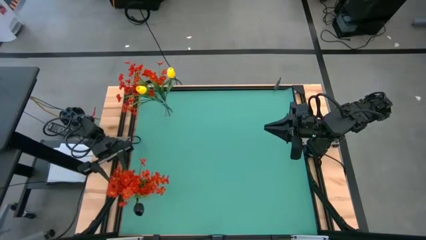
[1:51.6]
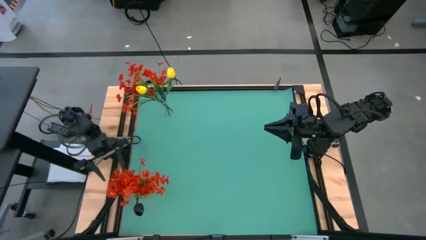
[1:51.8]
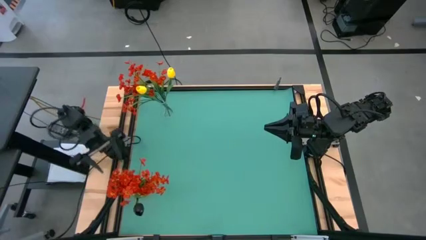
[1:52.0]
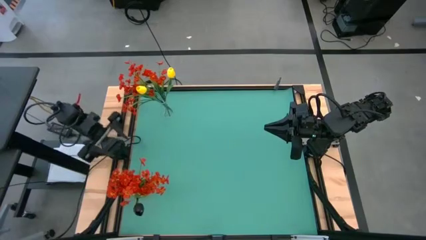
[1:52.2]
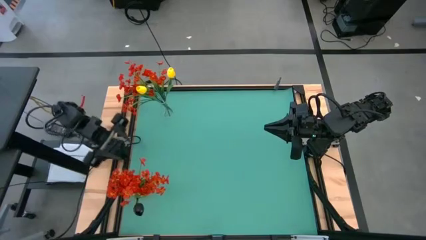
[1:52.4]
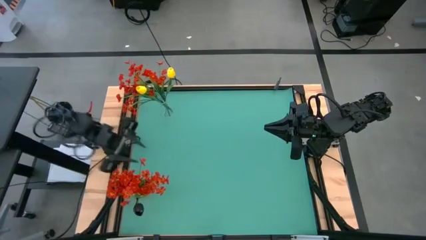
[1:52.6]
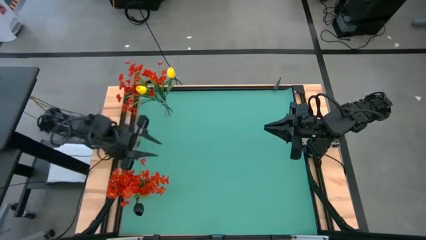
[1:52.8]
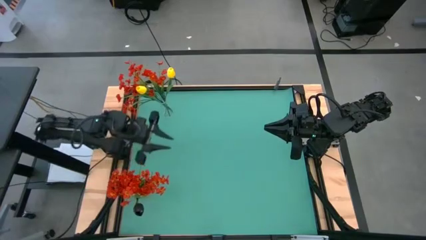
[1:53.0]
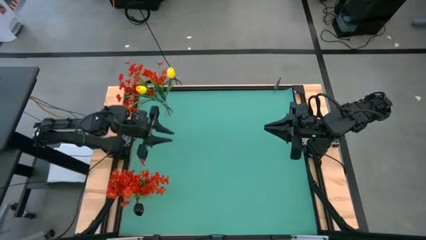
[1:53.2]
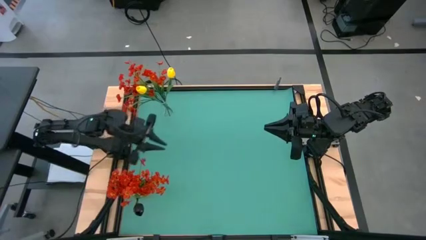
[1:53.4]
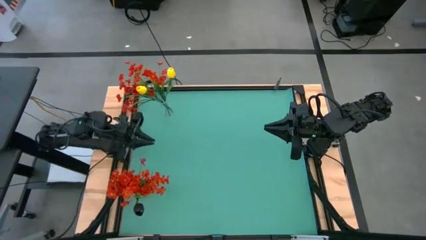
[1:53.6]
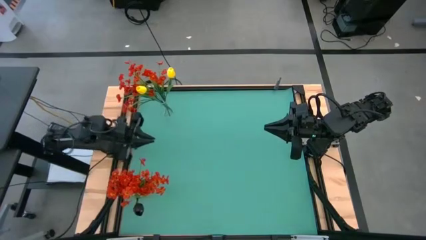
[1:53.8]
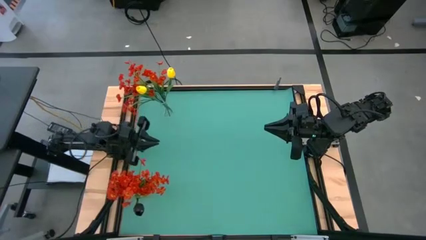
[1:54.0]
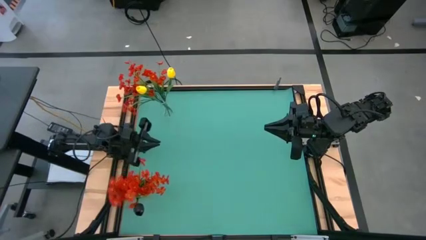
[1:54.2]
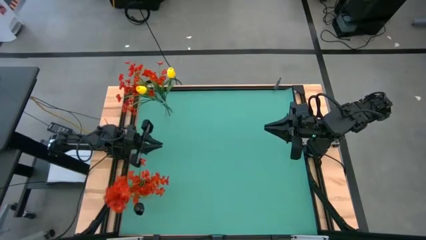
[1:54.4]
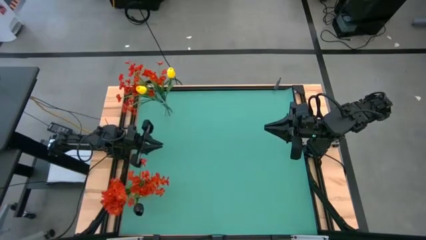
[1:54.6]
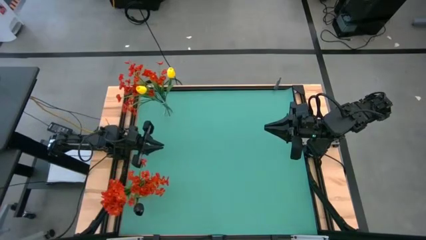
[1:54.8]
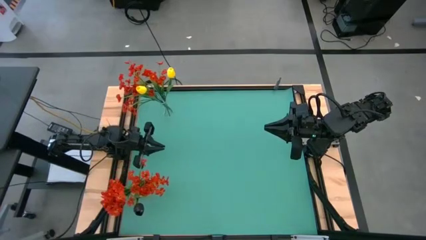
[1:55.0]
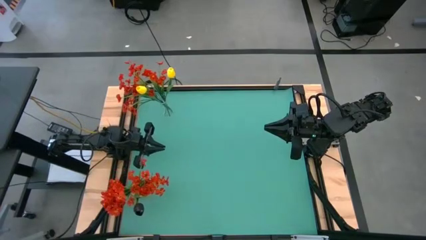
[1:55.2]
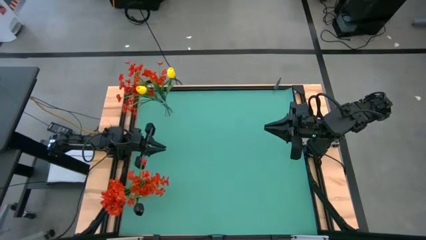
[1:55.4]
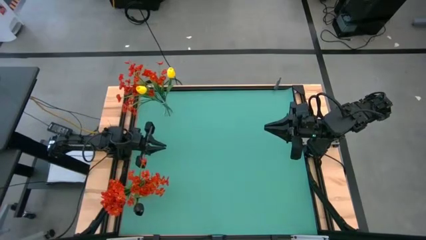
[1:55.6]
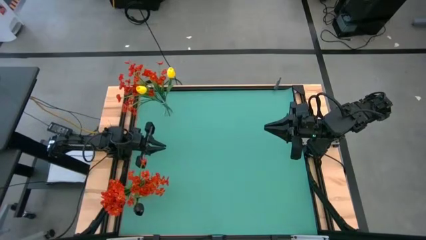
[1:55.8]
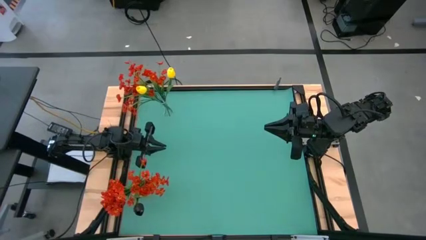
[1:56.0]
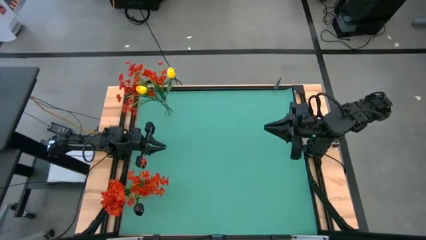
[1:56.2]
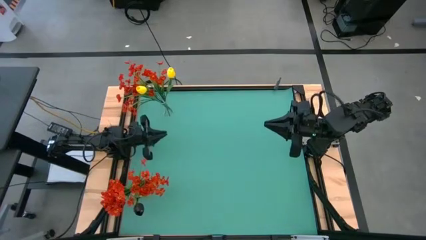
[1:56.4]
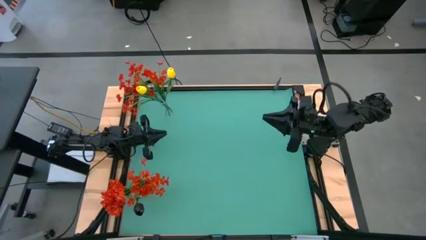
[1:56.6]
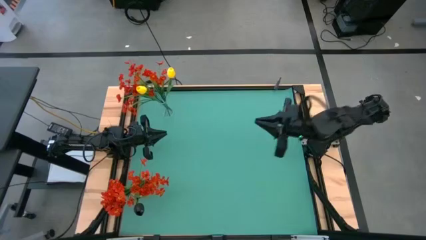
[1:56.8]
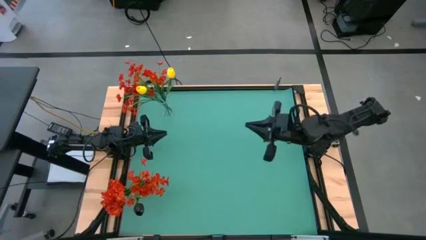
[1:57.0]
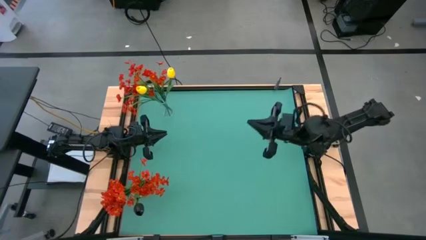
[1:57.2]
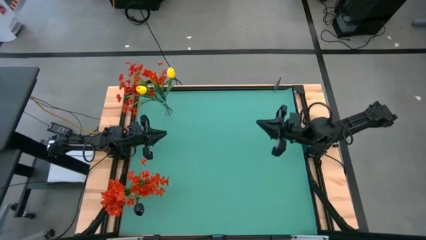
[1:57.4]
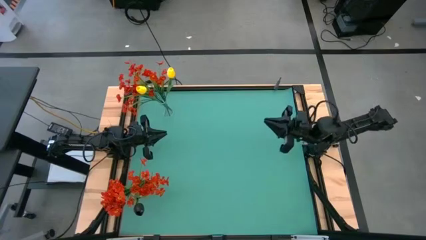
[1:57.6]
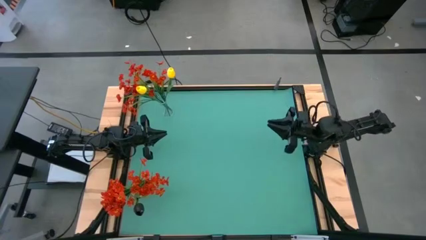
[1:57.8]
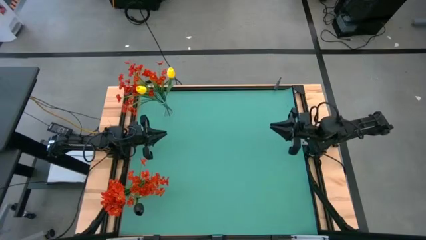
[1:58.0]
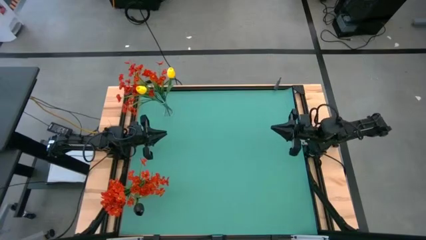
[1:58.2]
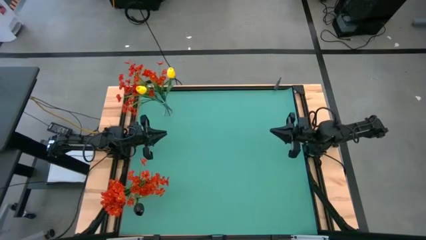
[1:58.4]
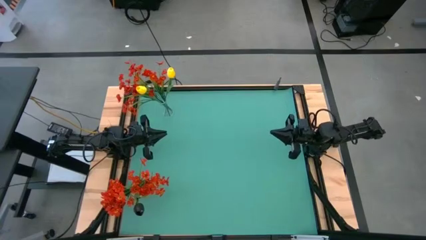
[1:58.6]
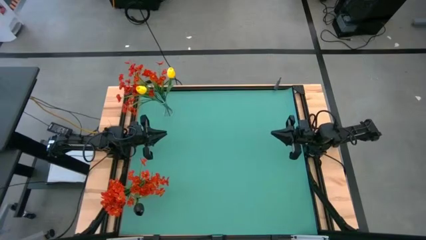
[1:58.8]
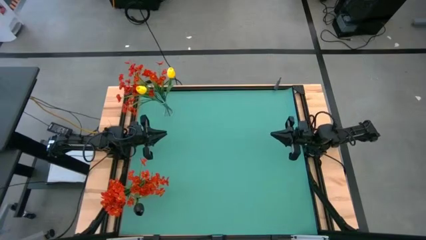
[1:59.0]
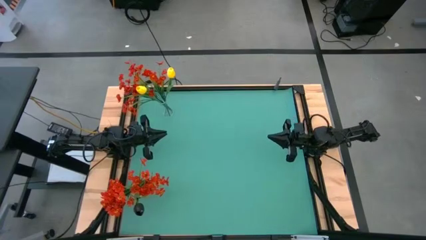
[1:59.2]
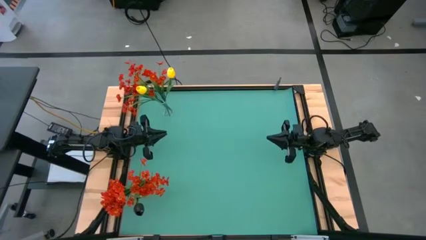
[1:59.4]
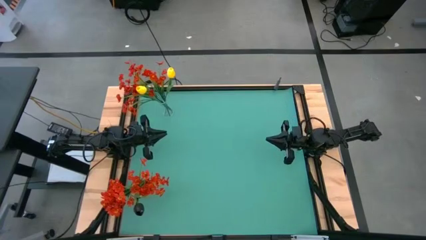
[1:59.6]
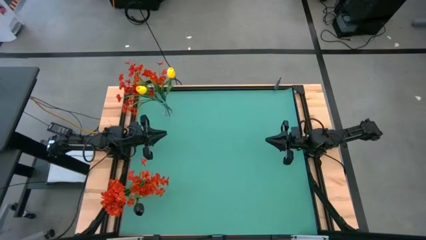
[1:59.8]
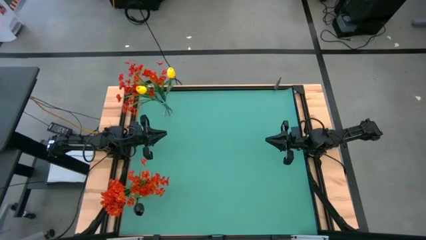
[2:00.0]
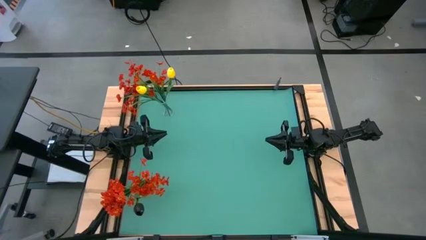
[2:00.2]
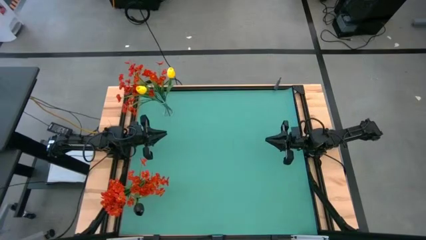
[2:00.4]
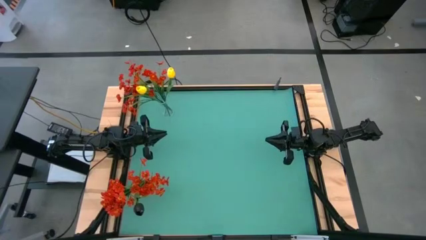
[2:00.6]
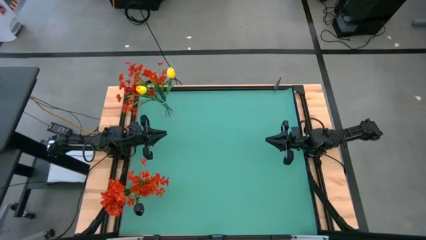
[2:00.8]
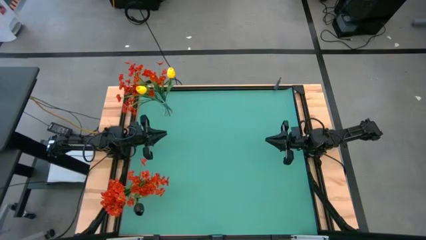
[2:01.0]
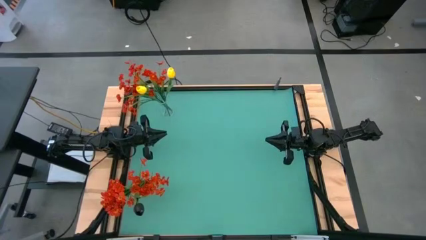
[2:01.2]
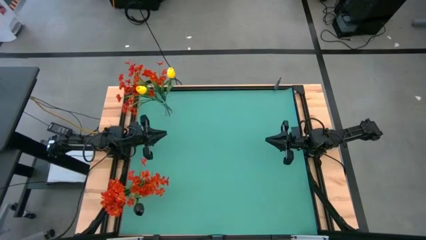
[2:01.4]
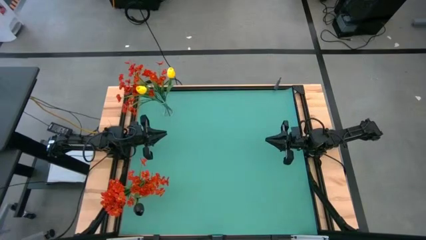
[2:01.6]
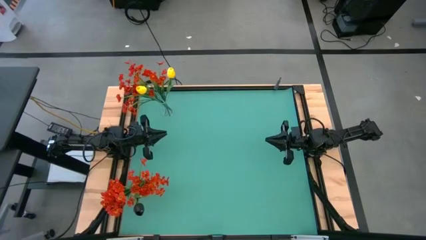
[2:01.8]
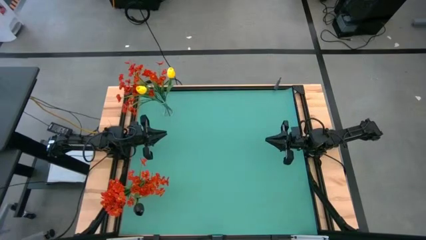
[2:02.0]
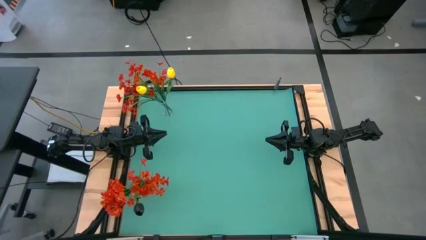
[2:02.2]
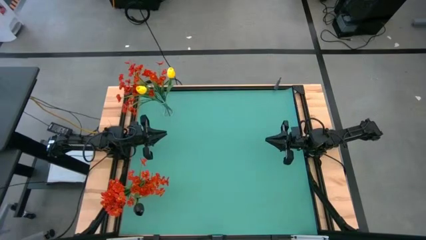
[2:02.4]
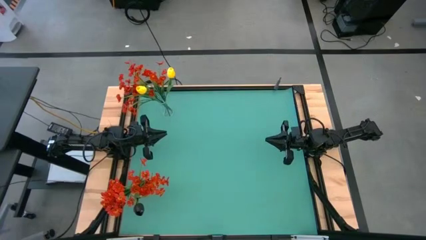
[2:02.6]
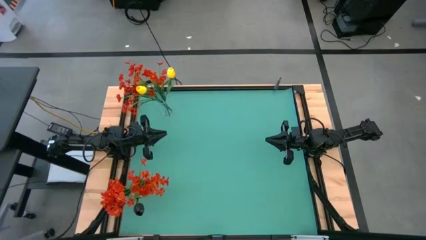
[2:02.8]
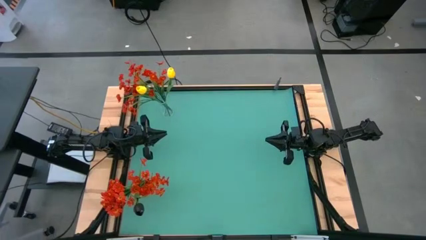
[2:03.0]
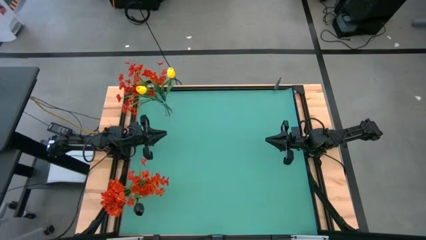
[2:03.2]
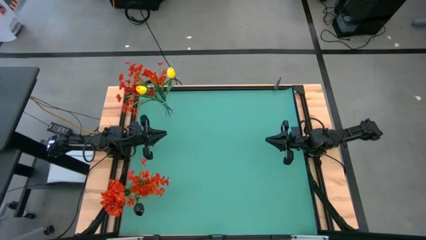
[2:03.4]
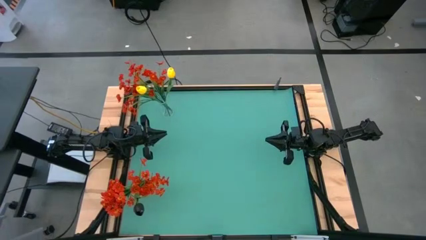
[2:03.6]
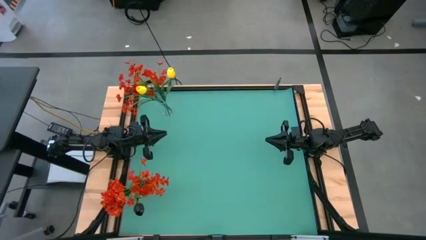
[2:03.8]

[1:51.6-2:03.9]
Task: Sort flowers into vase by color
Return to Home Position

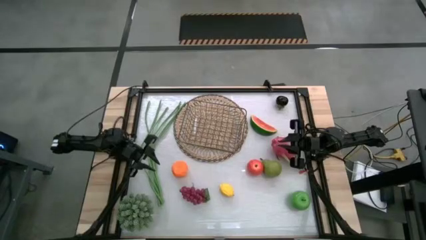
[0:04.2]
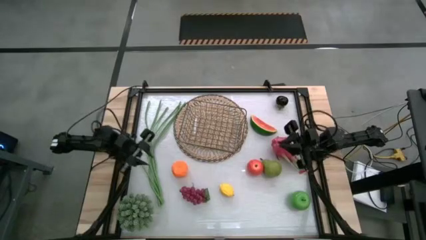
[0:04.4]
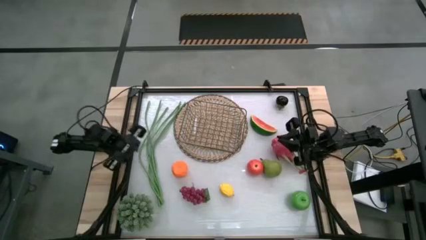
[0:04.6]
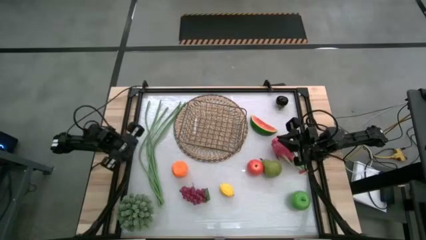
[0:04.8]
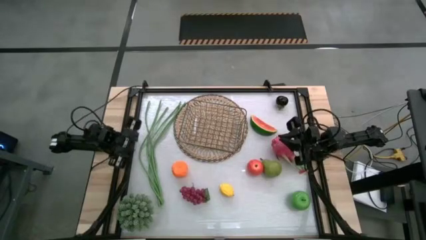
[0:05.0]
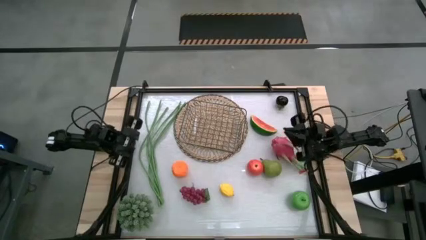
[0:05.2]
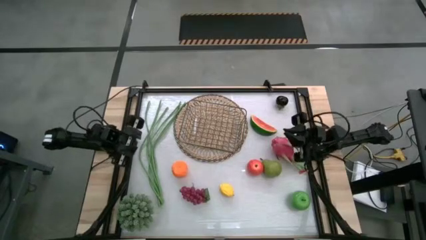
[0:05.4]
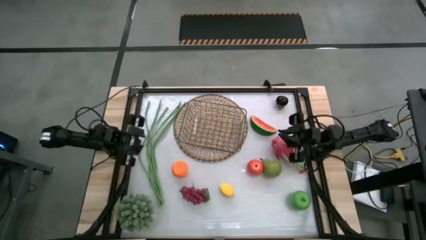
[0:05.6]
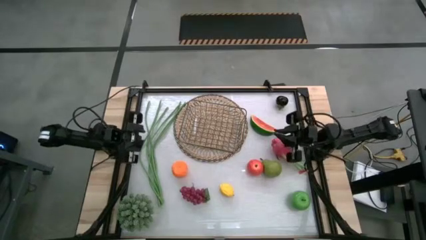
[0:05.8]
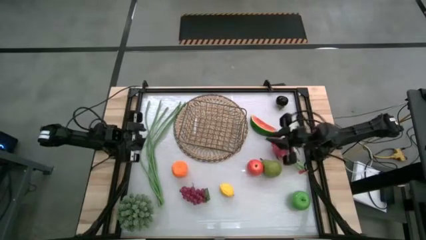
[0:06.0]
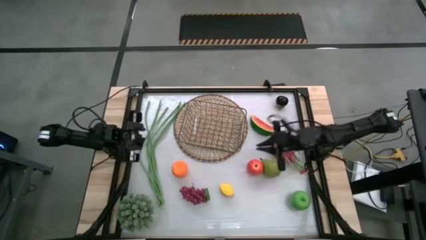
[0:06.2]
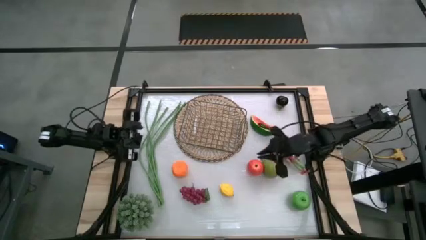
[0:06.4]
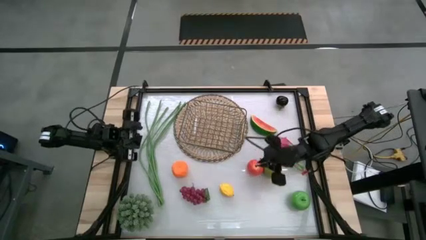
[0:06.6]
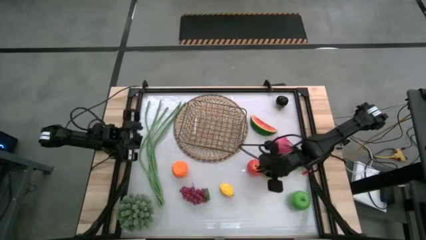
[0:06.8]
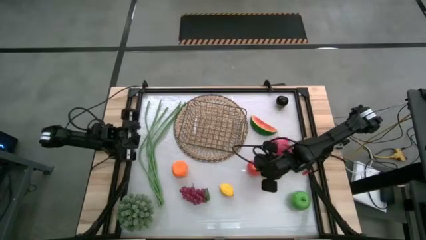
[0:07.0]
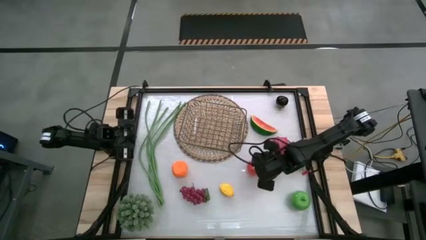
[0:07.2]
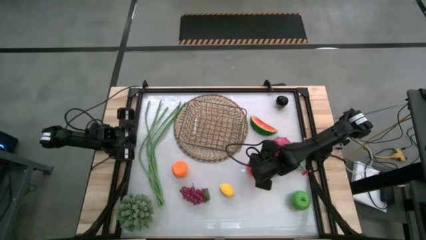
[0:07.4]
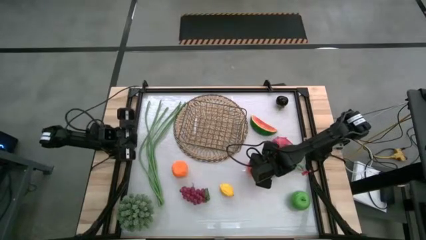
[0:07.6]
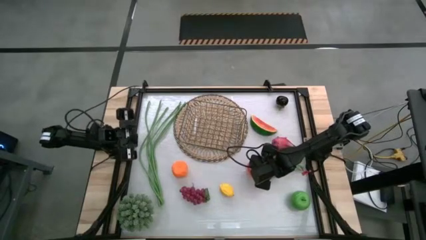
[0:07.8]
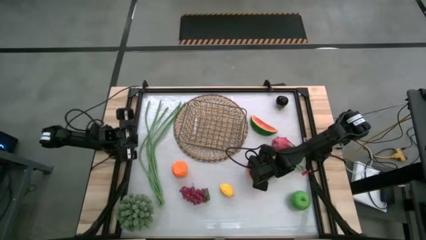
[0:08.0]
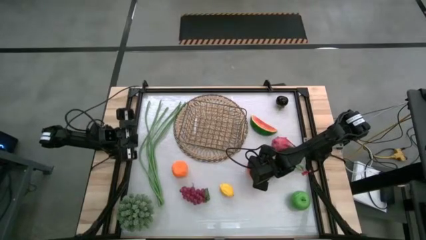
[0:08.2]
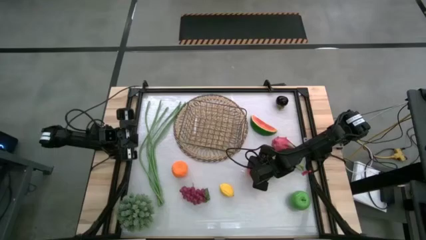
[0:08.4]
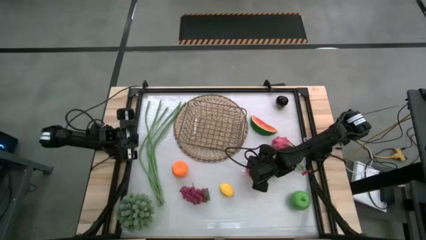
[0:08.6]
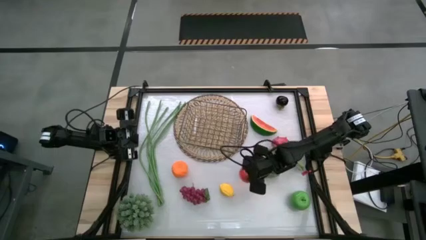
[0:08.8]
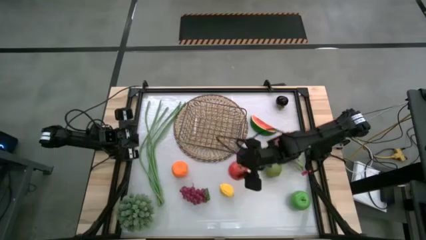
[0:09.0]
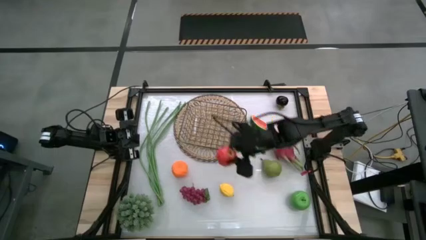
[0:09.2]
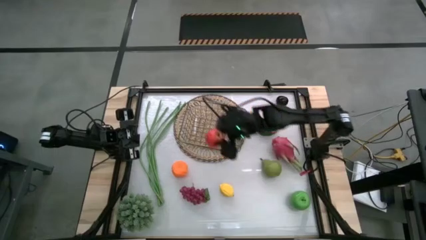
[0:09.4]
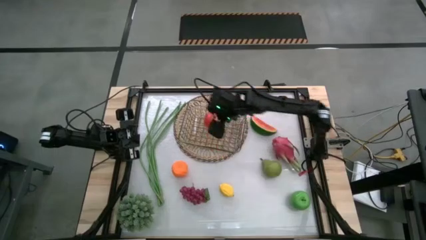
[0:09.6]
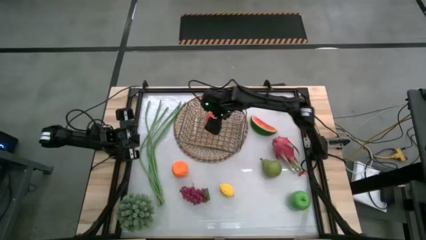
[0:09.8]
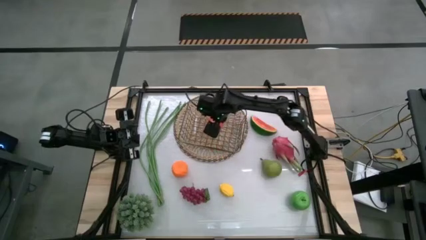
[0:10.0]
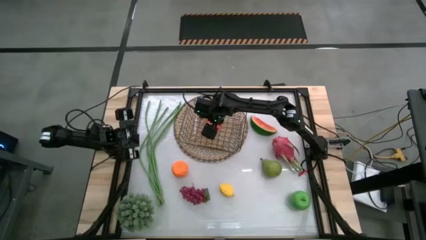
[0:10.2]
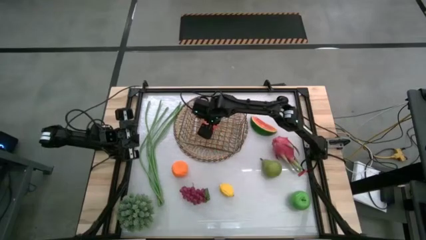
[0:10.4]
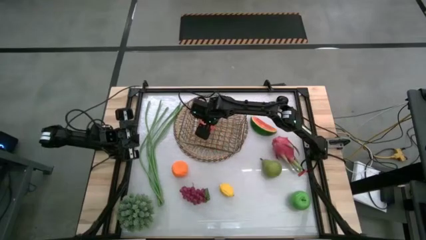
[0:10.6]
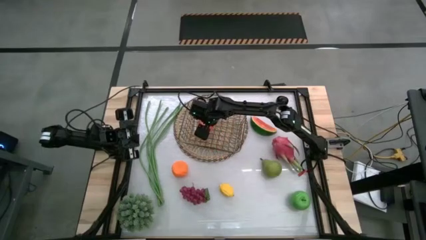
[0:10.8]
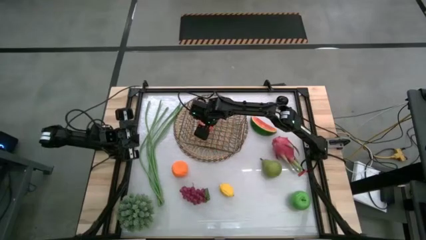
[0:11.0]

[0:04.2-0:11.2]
Task: Build produce basket
Put the red apple into the wire basket
